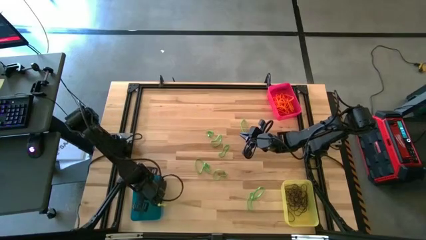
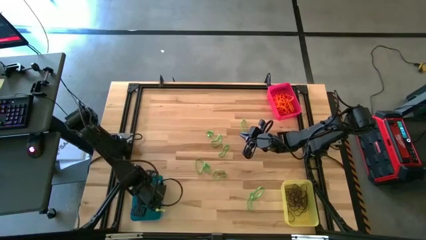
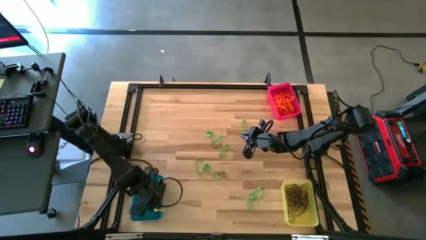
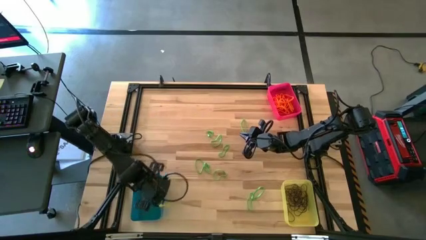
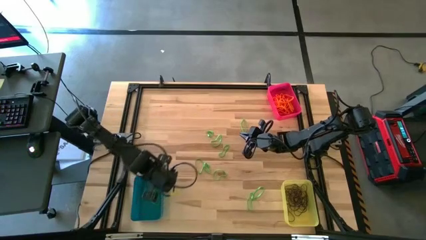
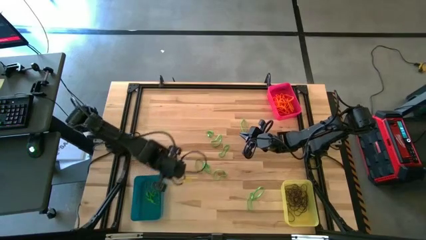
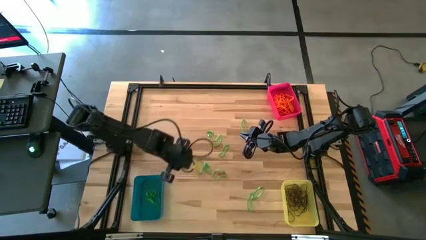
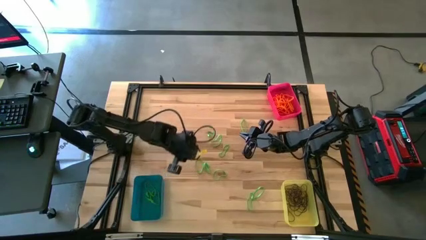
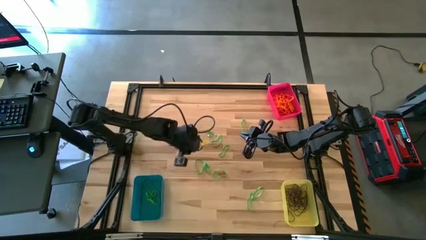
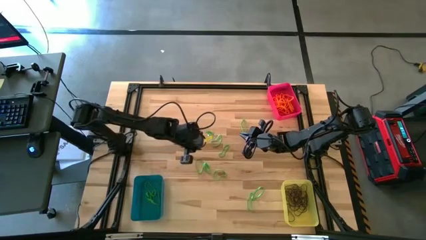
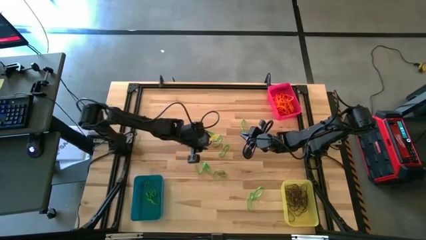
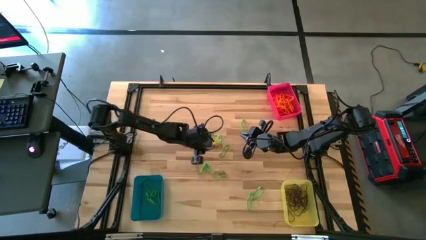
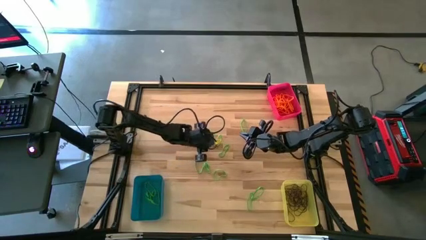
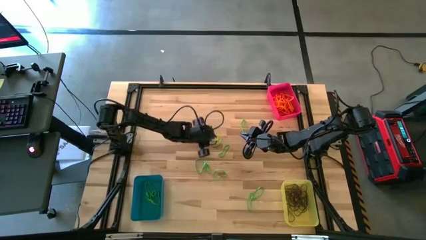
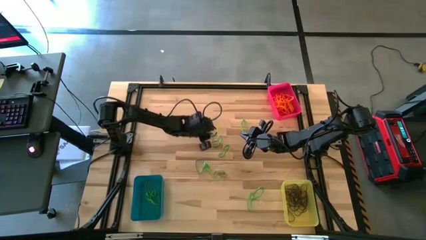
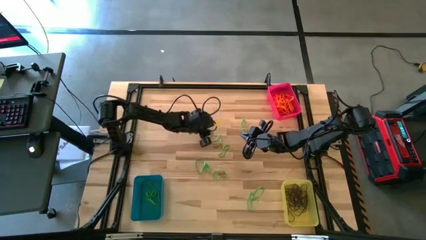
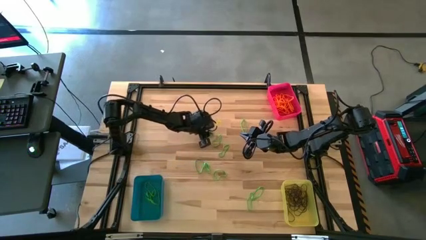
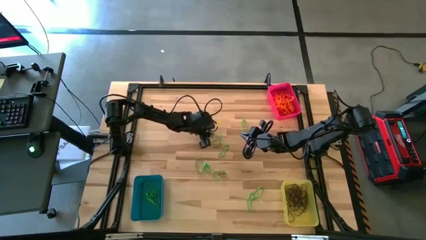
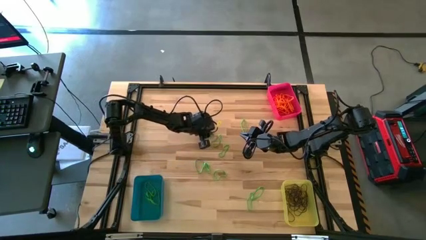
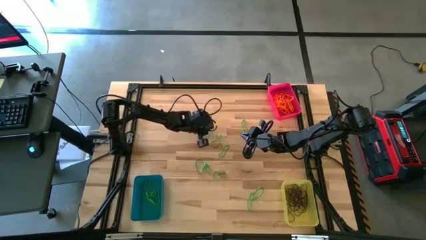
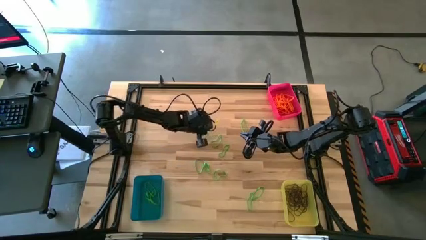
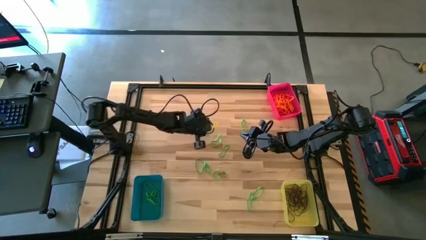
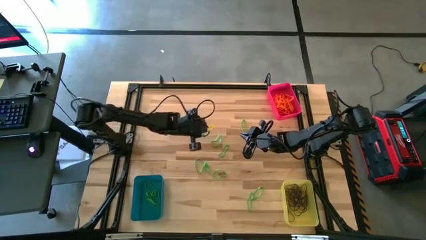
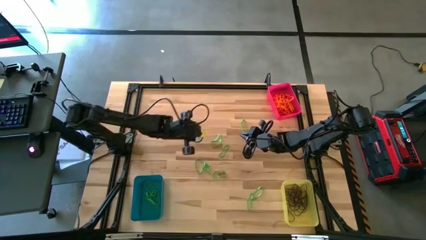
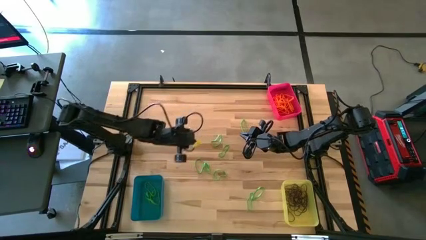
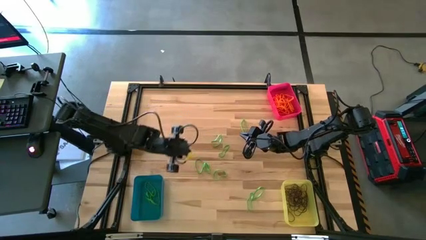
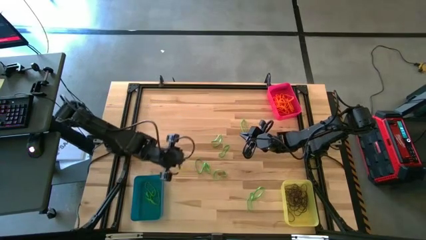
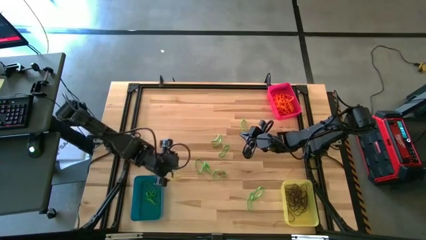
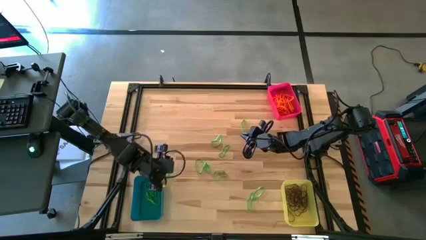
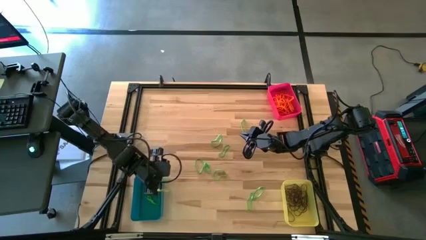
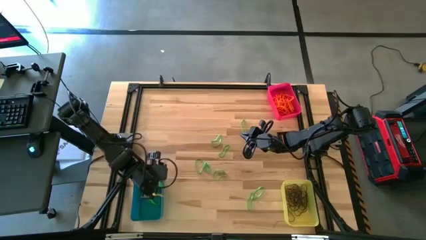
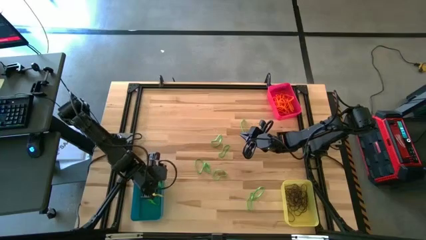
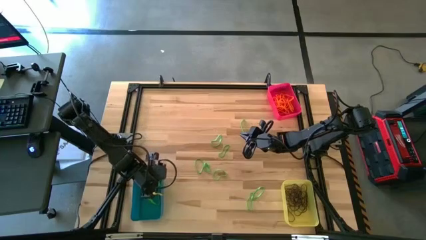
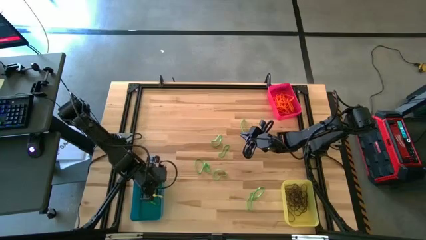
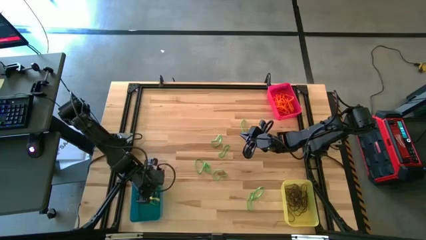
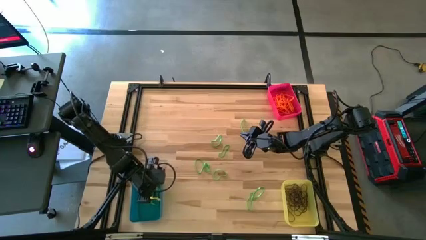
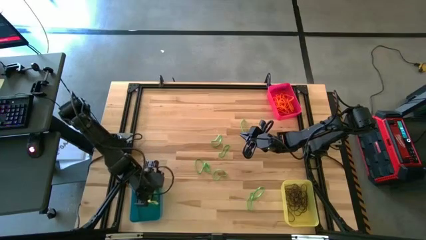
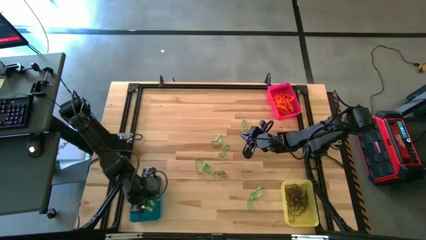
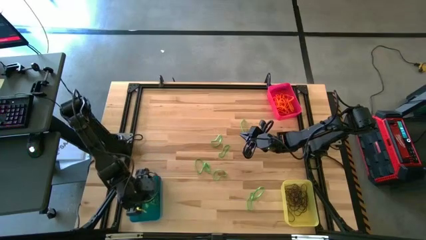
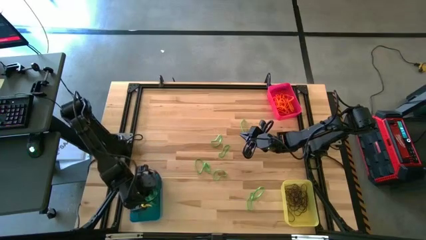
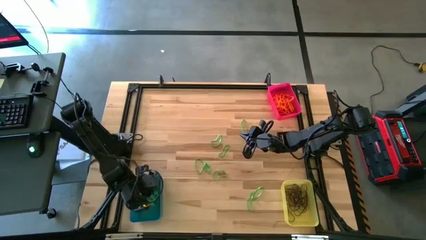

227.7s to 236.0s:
Task: Sort rubber bands into baskets
Put the green rubber band into the blue bin

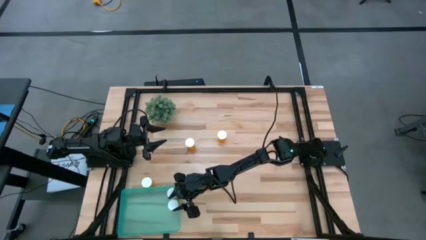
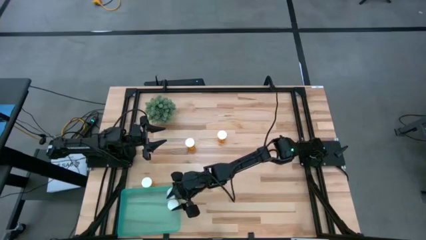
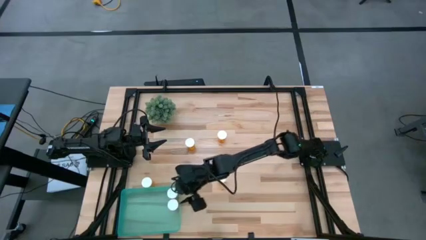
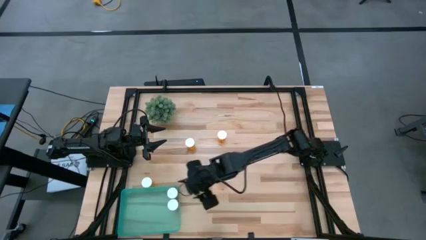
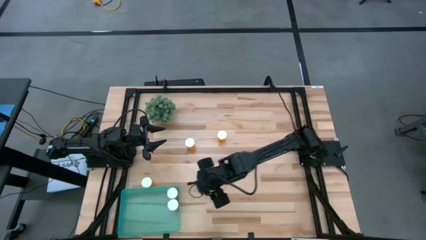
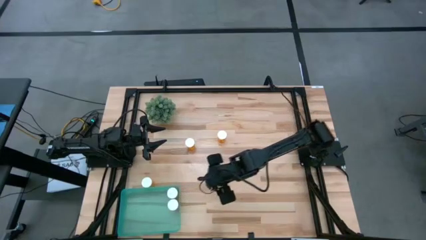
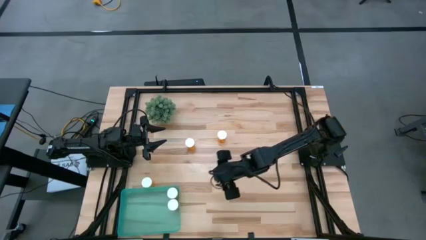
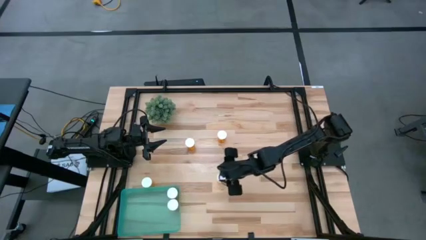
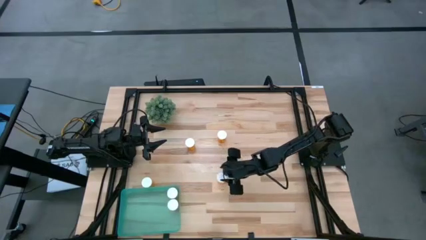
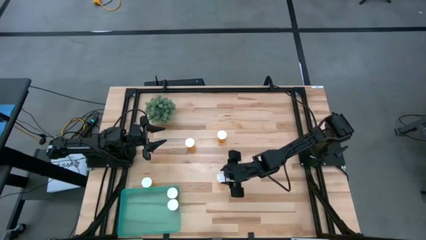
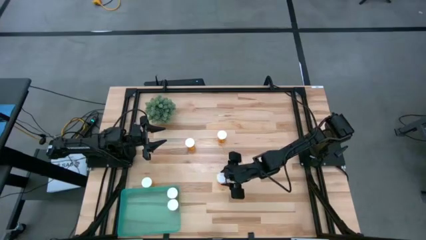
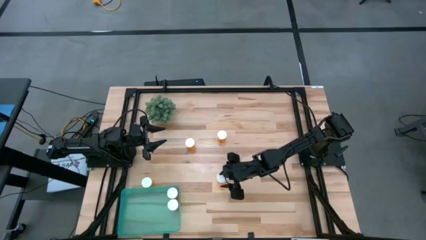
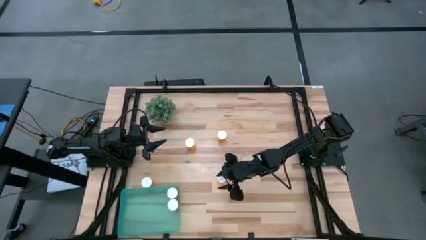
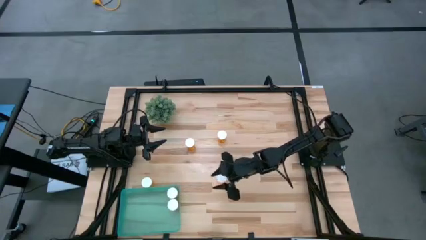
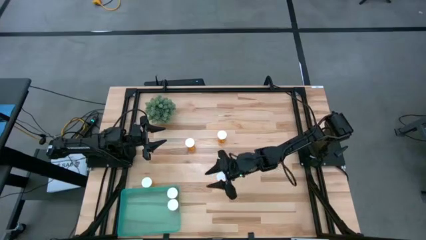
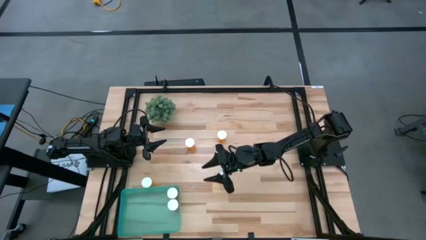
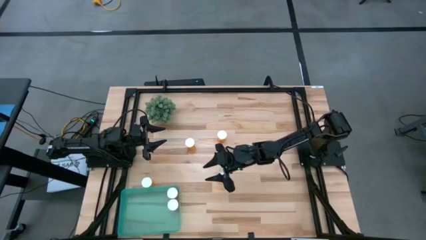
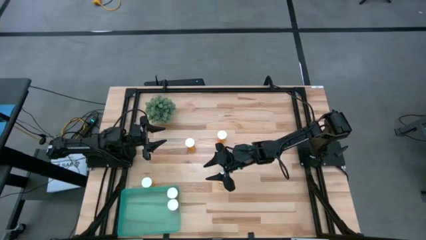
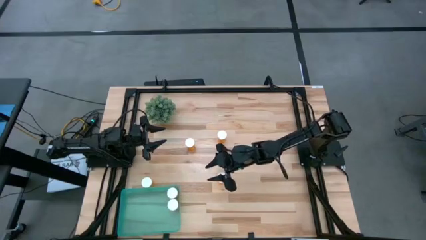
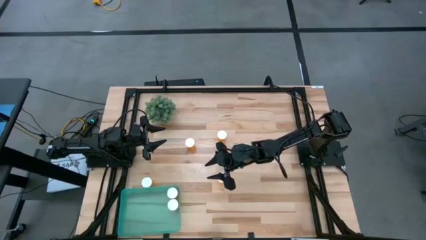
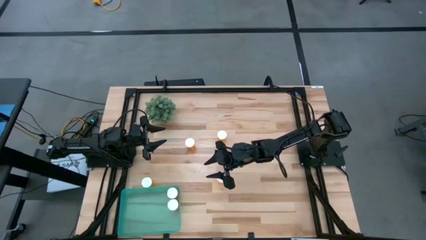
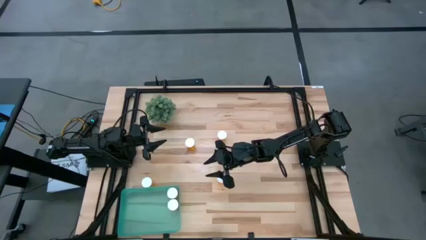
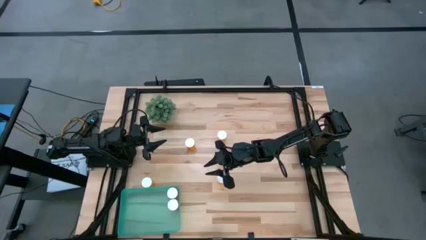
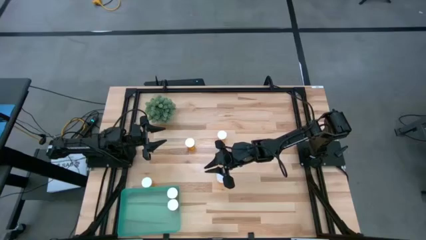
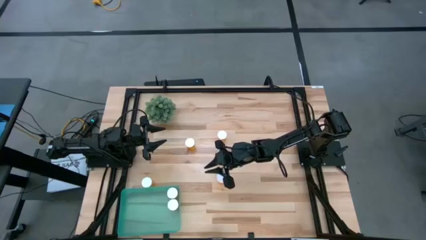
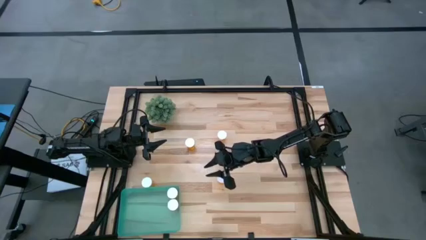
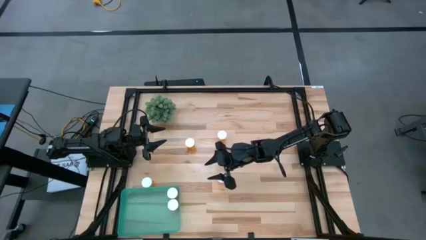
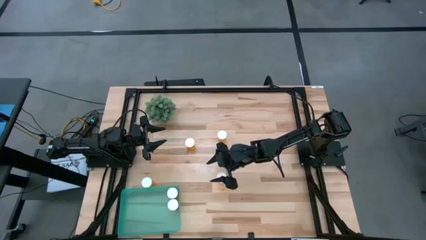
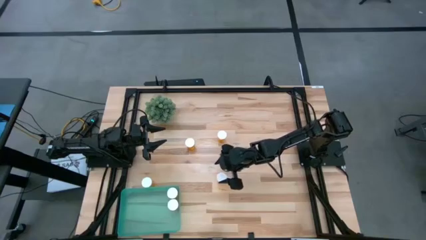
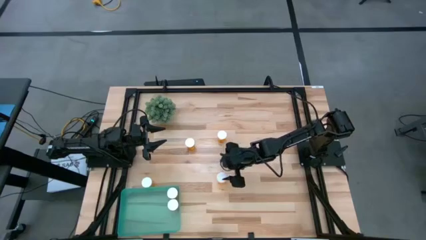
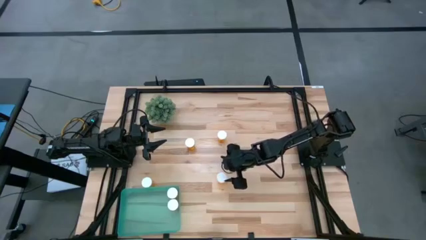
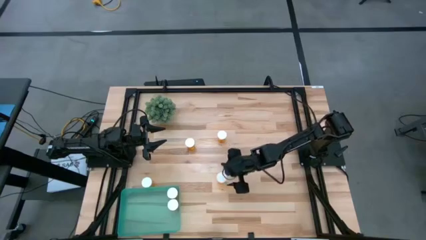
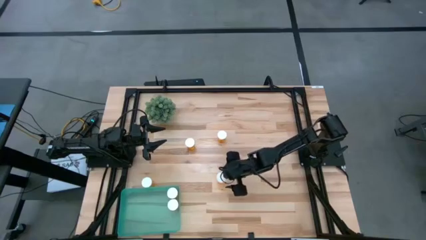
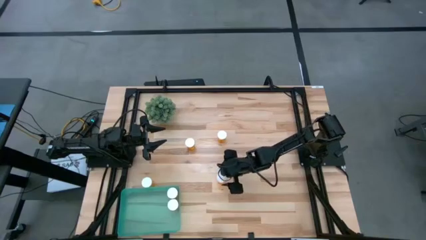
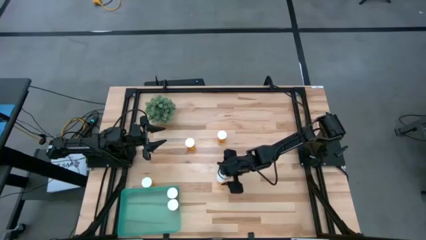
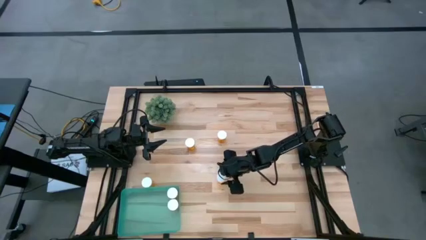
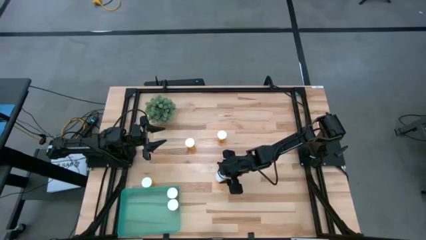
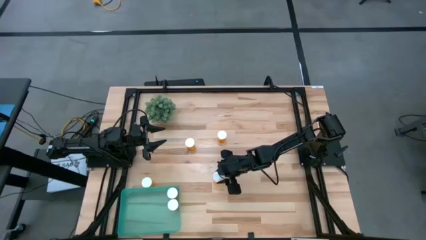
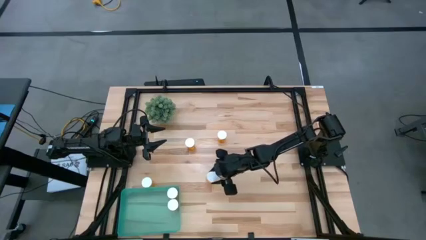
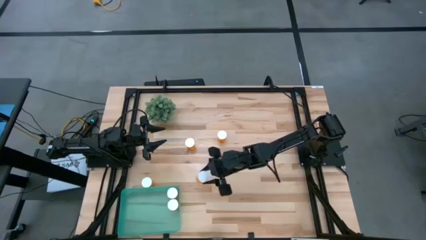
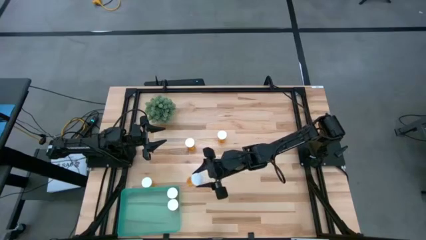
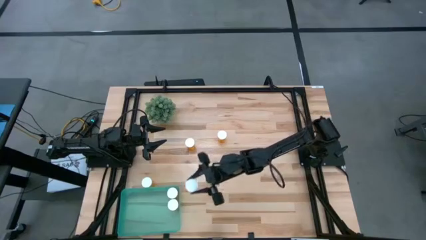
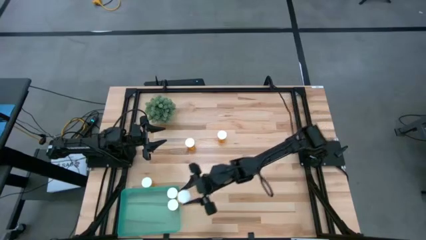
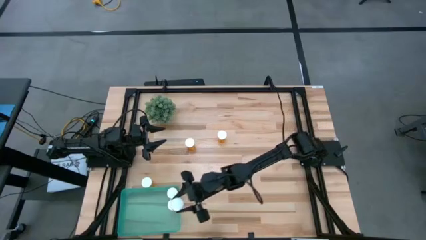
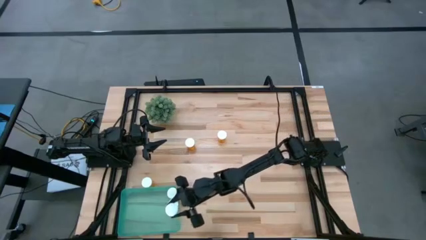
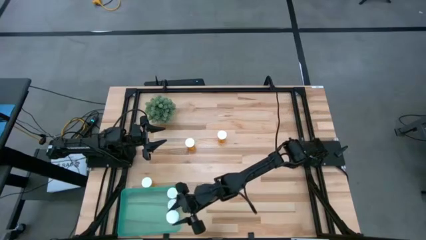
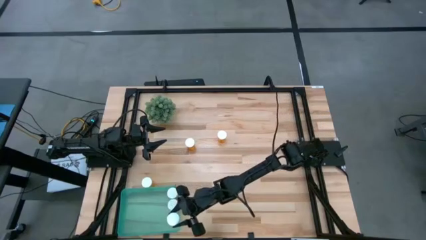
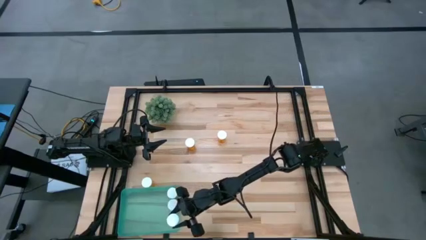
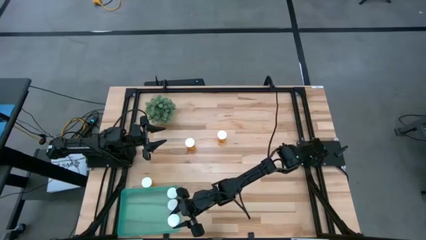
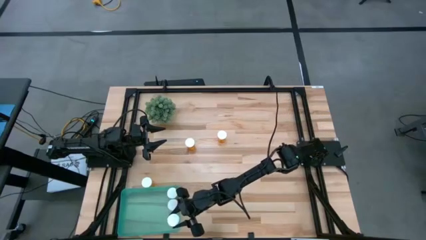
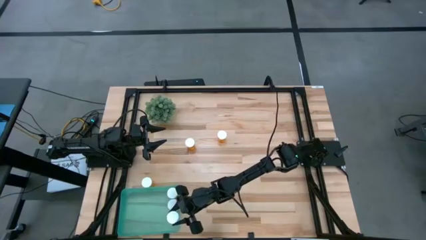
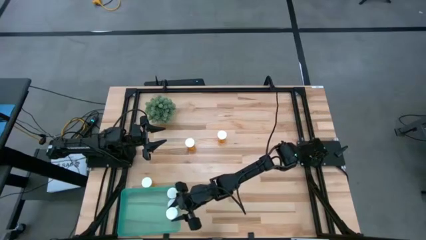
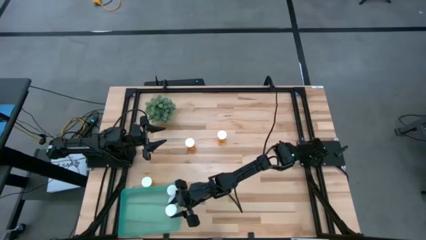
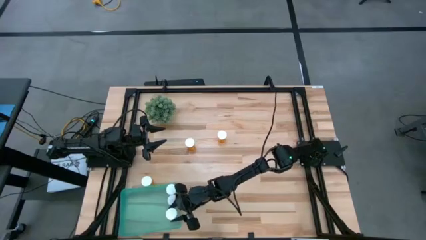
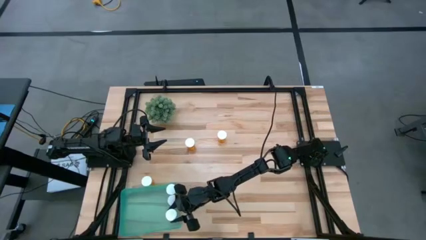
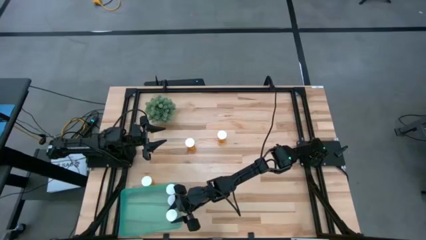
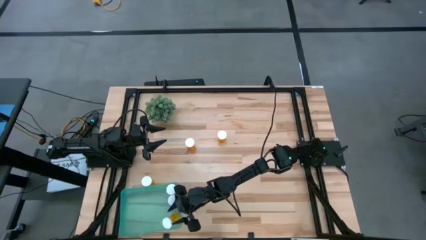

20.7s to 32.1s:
Task: Pick and place pill bottles into a basket
Put the yellow pill bottle into the green bin
